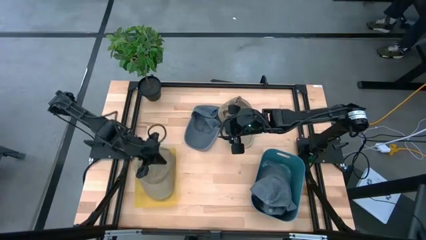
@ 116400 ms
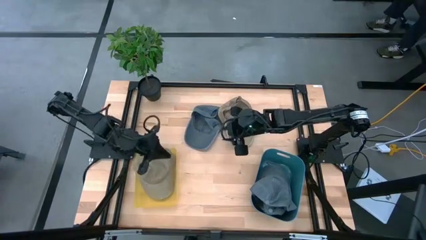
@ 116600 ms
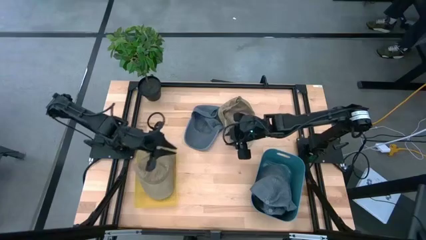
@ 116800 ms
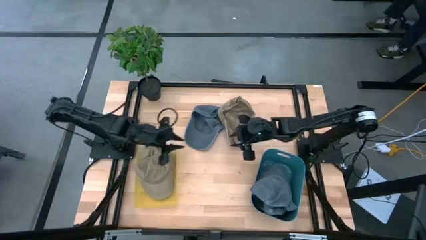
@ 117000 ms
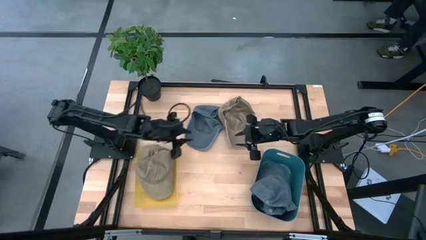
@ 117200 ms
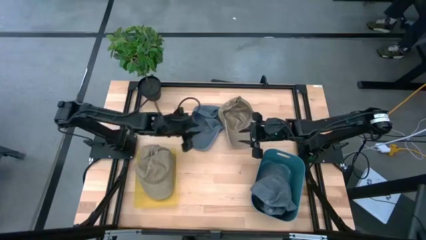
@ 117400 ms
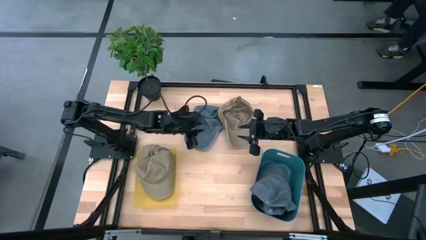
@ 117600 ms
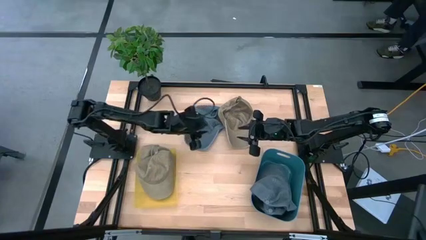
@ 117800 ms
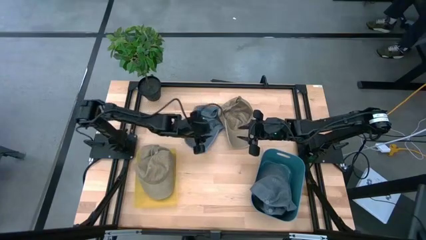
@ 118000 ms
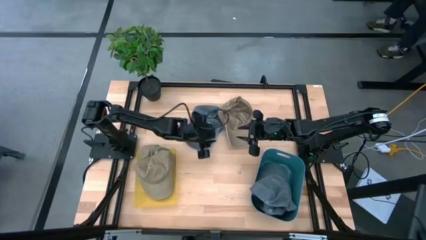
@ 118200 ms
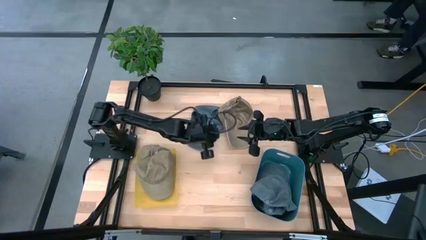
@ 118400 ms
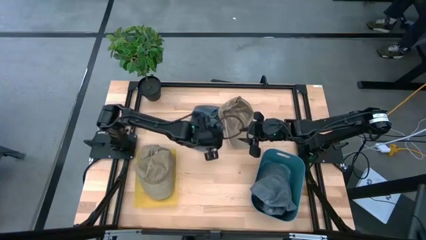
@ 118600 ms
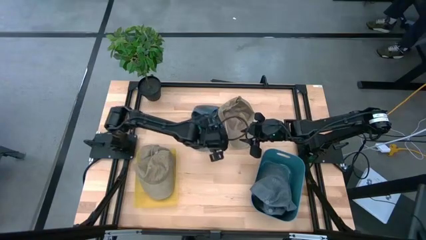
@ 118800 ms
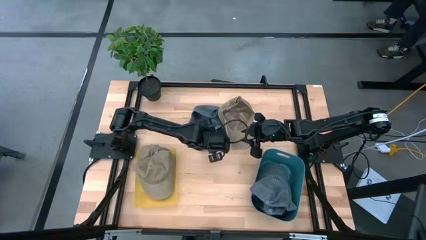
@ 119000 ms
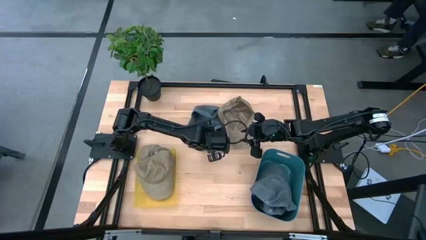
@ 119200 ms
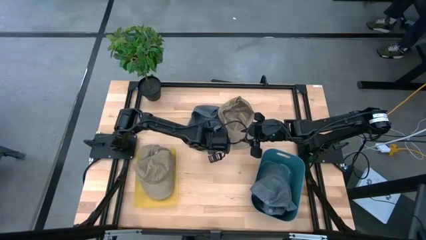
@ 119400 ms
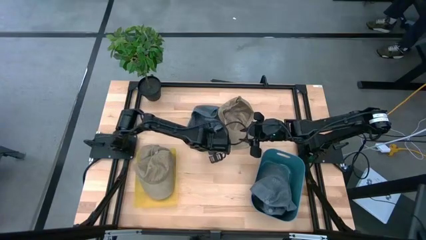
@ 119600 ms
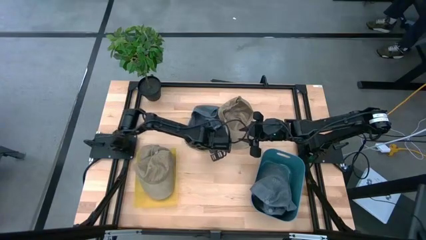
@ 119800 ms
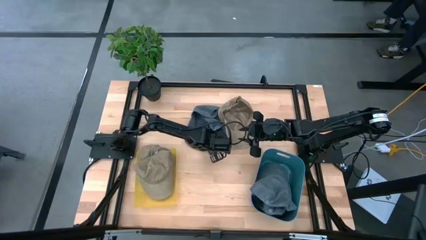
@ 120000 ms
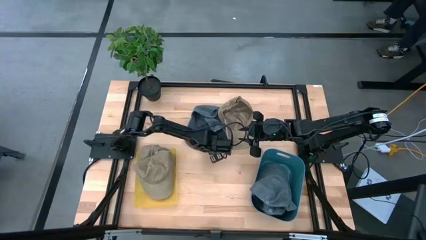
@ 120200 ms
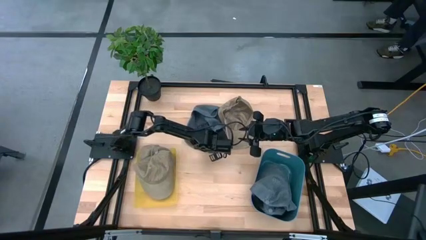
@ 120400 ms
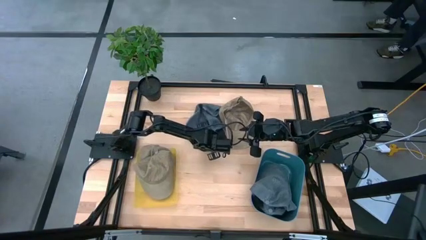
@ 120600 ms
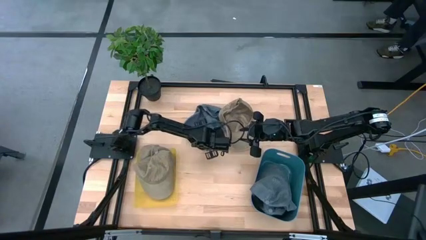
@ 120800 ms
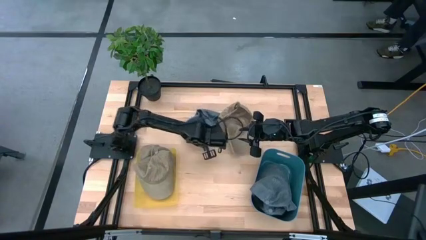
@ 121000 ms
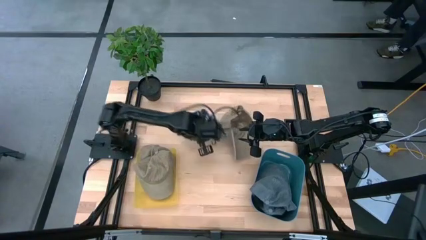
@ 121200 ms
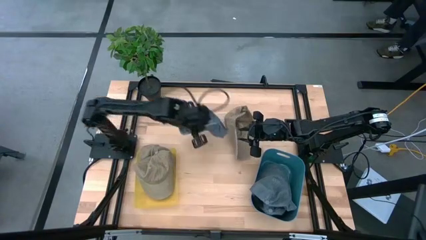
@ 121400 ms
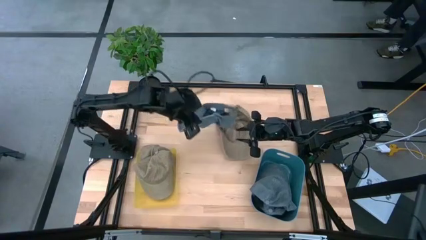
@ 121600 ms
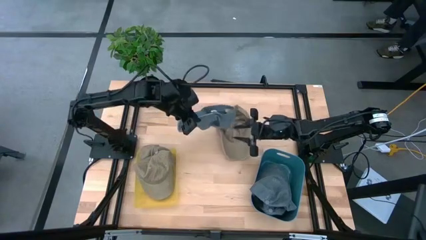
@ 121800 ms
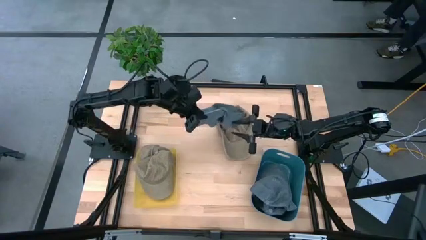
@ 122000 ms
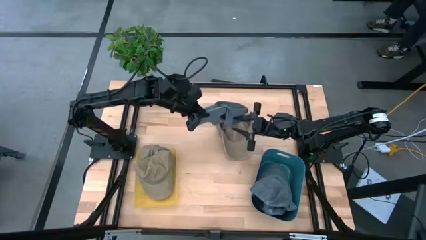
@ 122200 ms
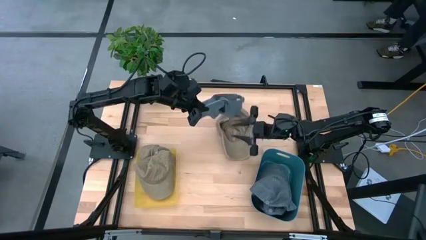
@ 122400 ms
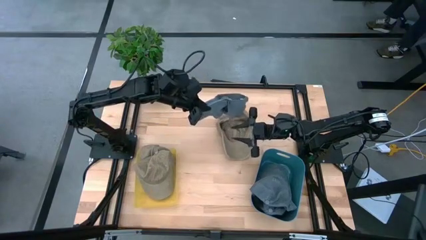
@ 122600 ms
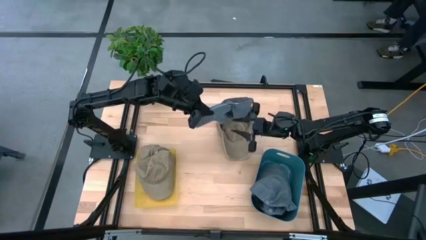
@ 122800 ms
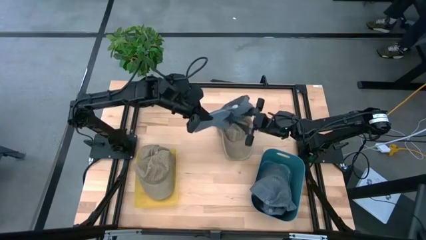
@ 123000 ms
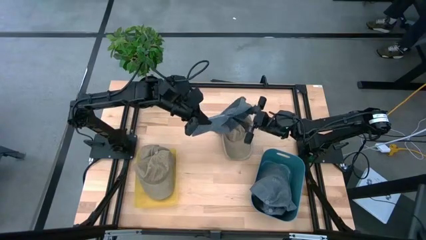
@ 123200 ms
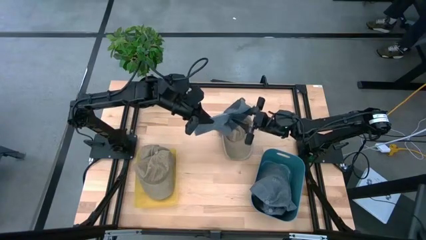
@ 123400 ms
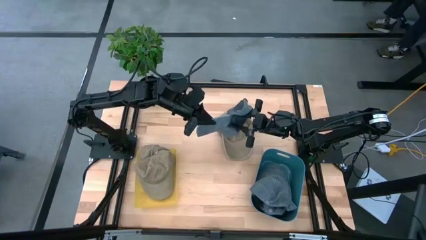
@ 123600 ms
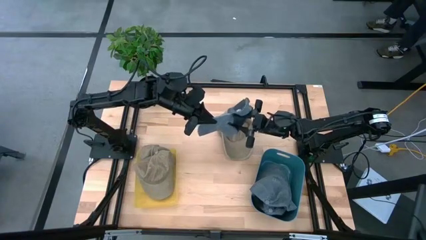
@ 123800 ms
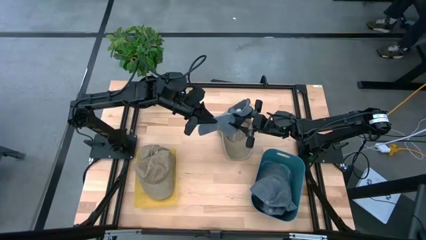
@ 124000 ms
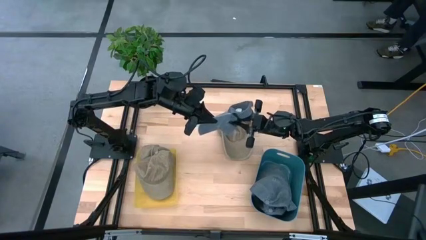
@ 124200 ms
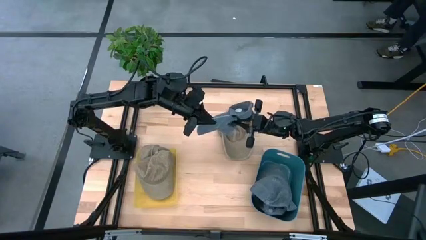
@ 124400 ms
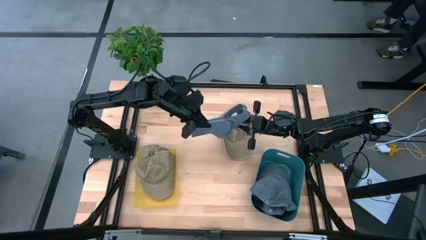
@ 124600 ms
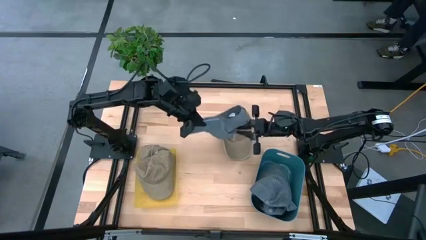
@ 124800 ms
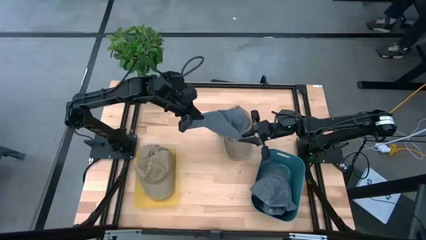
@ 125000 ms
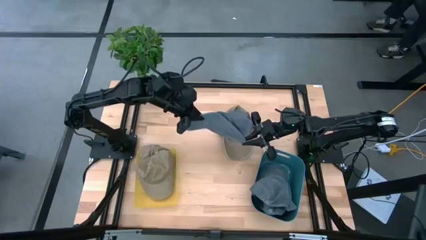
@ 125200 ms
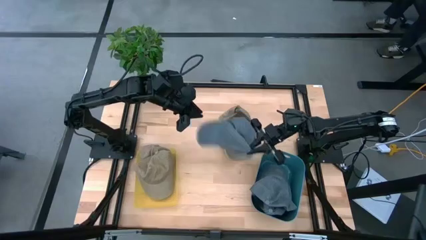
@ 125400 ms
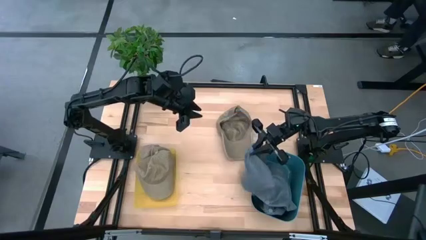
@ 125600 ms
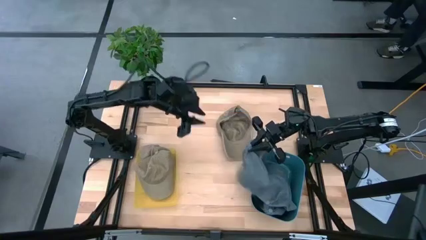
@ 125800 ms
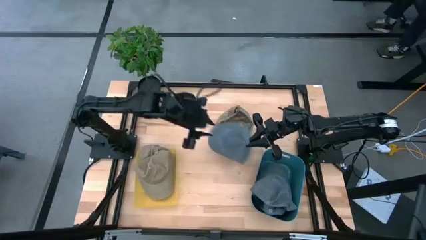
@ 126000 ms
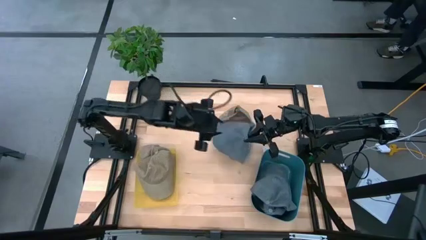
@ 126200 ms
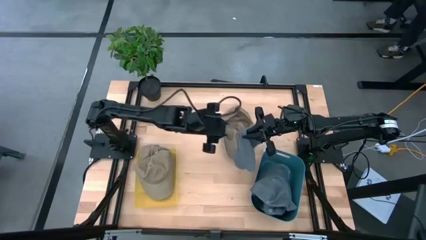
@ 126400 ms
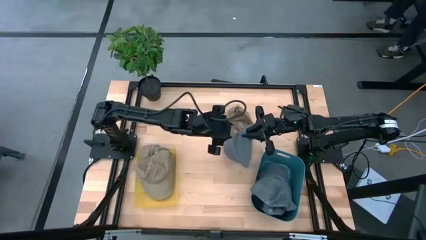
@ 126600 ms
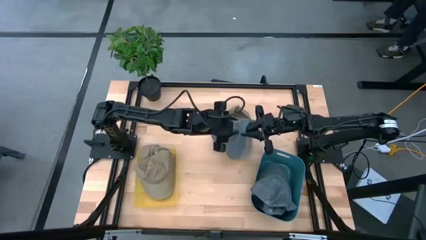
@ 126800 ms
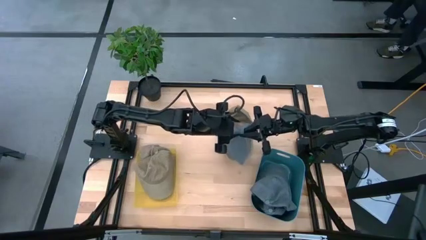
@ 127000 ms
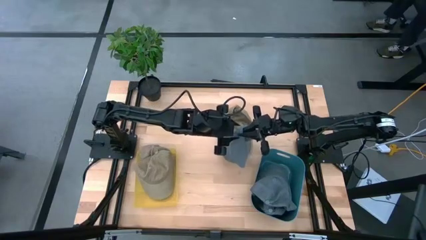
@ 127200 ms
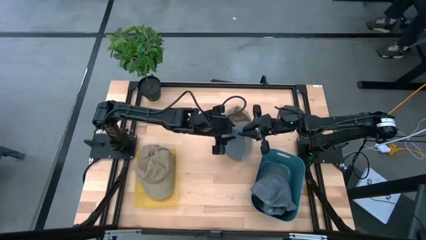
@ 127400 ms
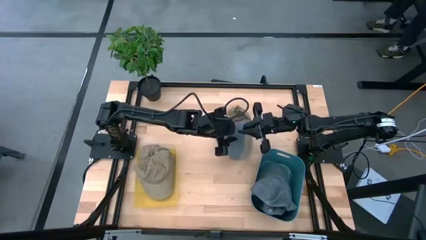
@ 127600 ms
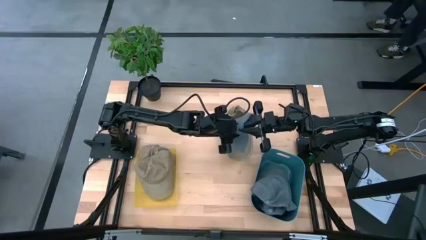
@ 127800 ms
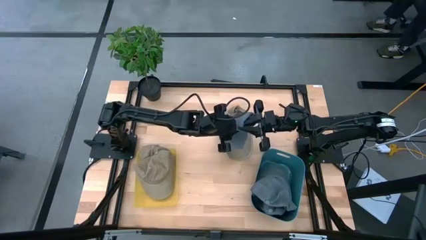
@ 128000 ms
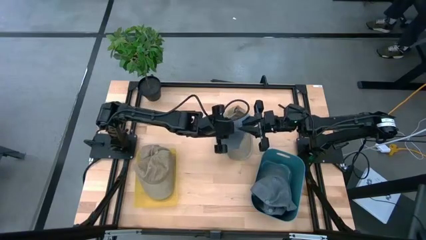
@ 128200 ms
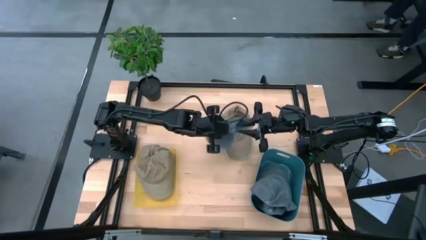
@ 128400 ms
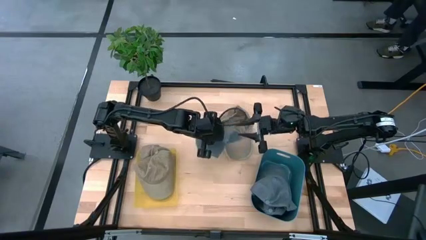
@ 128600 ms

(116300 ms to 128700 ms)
Task: Pick & Place hat
Put the blue cap into the blue bin

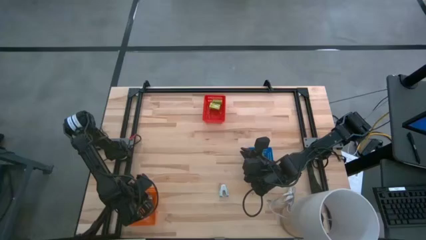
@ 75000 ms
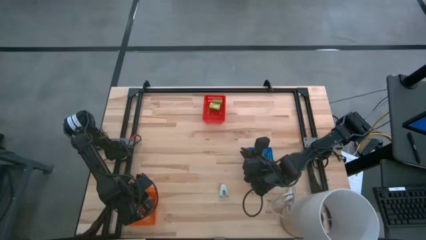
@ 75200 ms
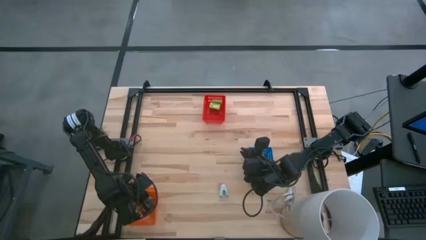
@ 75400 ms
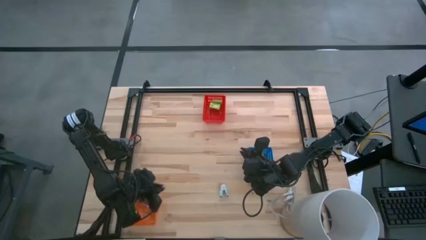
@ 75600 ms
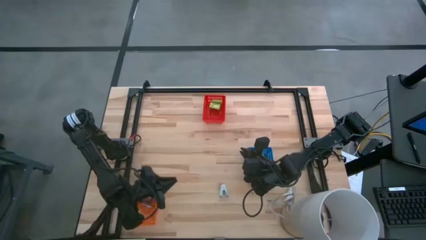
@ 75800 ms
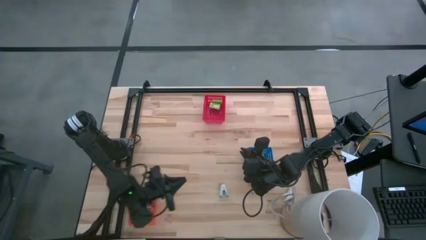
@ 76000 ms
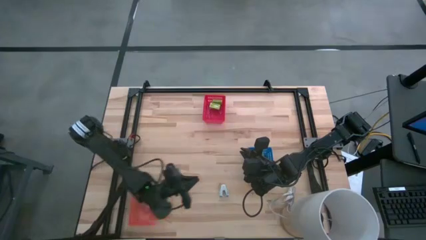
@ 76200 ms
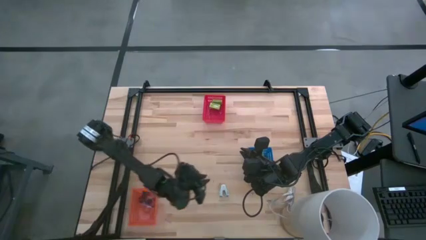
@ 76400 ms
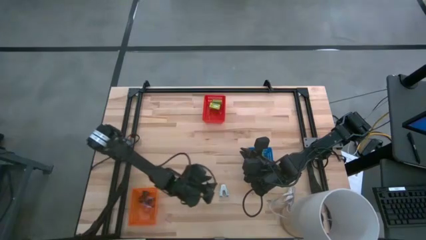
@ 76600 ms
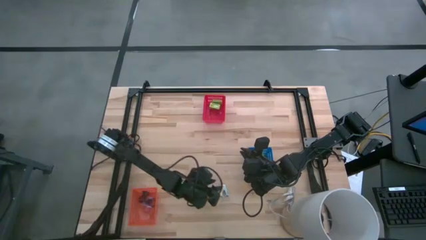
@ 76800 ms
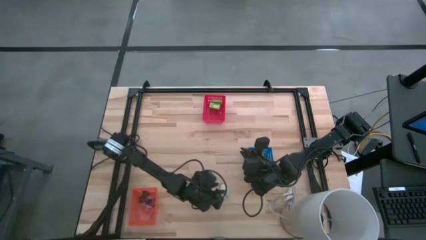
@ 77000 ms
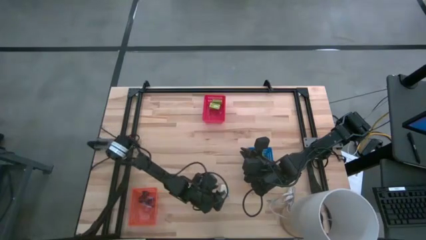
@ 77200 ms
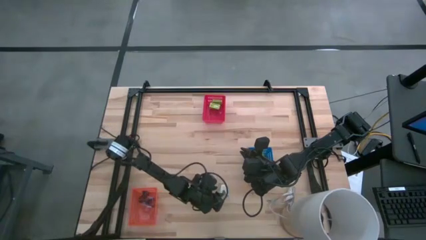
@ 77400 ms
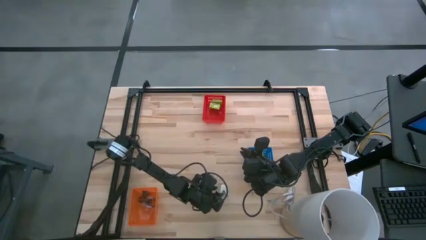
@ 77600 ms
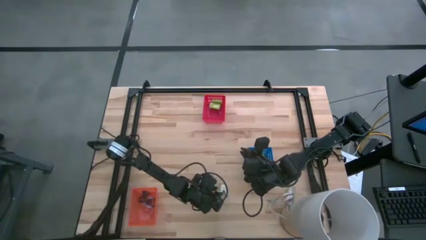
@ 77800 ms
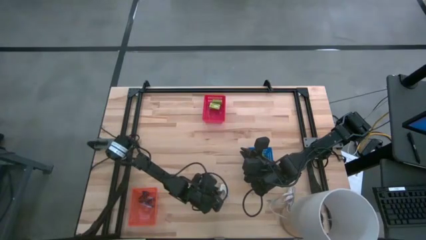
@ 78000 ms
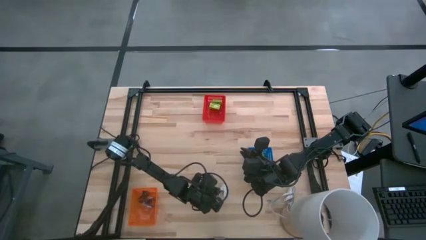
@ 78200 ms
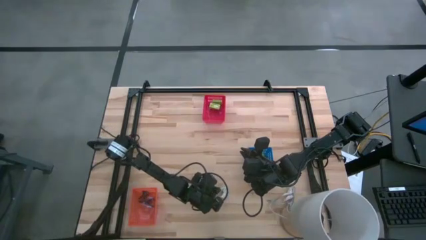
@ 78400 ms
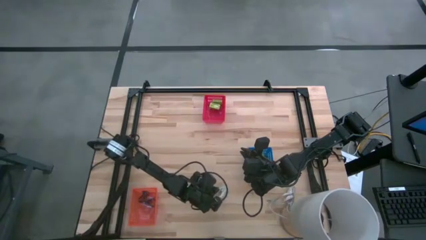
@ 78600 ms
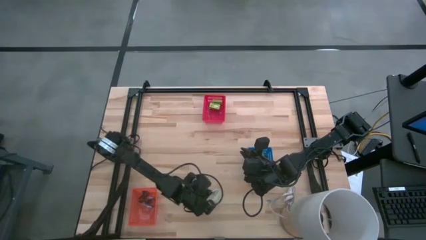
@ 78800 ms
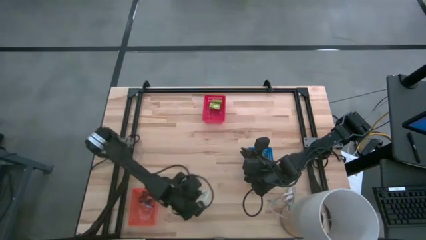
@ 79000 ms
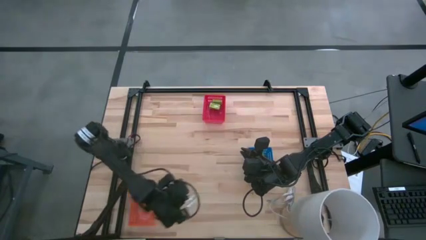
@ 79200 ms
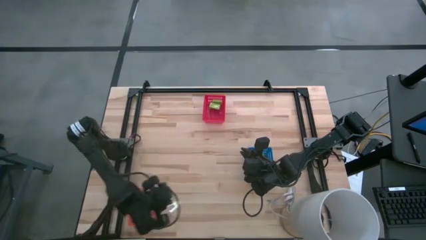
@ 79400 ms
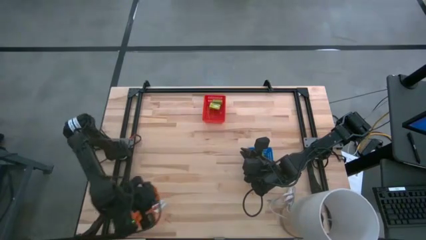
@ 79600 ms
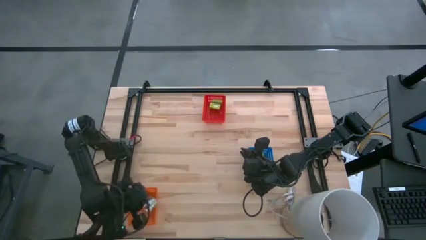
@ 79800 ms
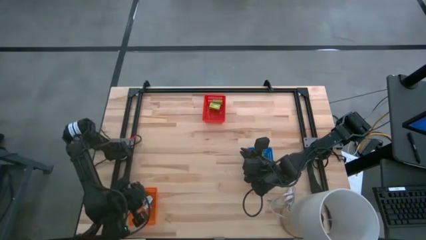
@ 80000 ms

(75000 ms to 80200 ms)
Task: Pick and place Stapler, Stapler remover, tape
Put the blue staple remover into the orange bin
